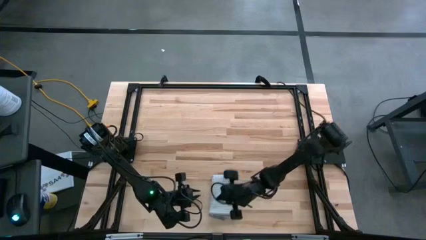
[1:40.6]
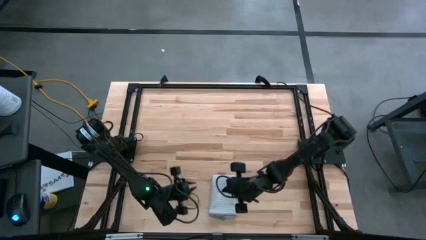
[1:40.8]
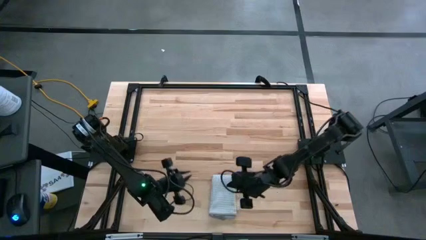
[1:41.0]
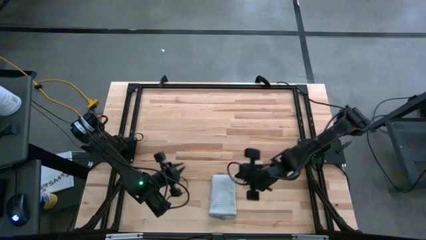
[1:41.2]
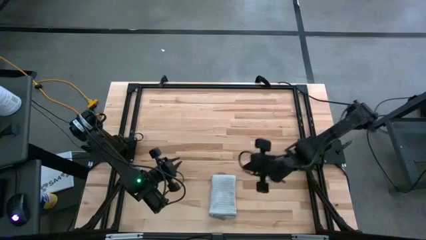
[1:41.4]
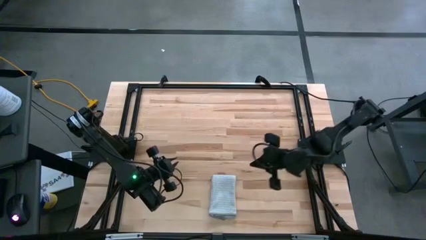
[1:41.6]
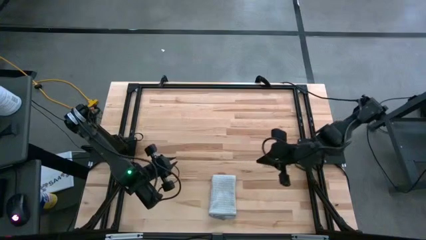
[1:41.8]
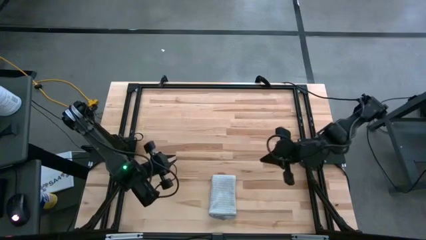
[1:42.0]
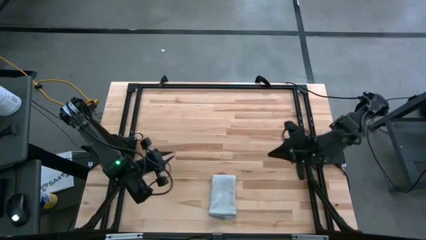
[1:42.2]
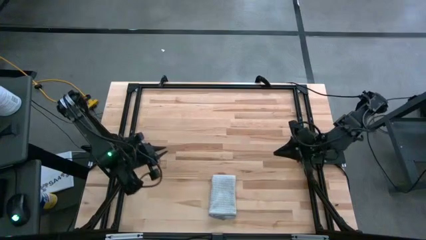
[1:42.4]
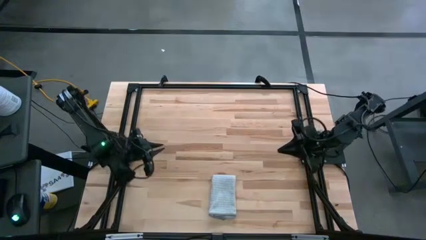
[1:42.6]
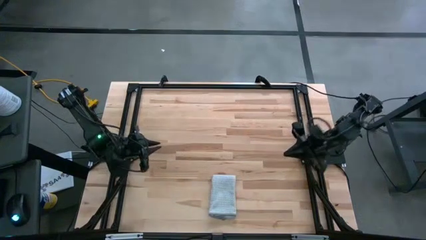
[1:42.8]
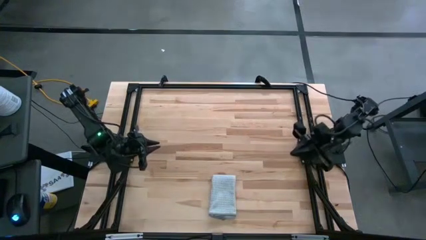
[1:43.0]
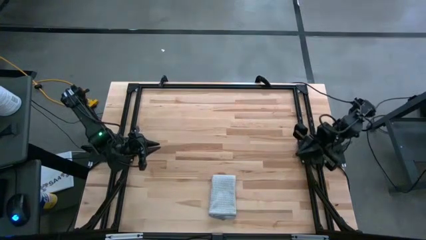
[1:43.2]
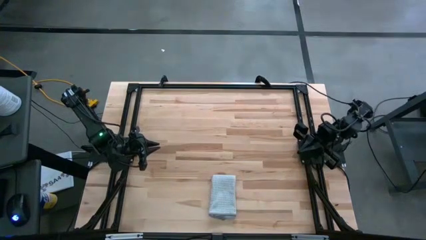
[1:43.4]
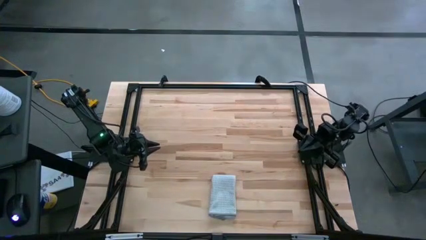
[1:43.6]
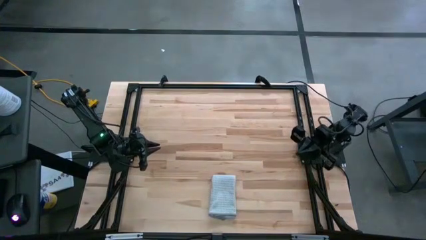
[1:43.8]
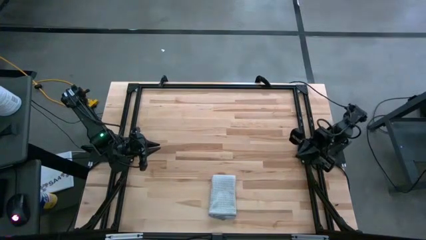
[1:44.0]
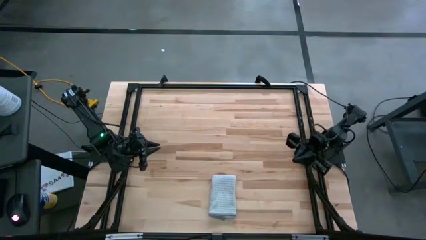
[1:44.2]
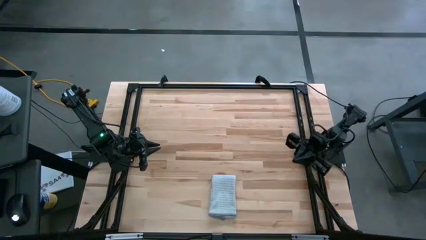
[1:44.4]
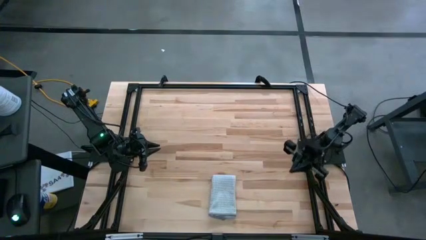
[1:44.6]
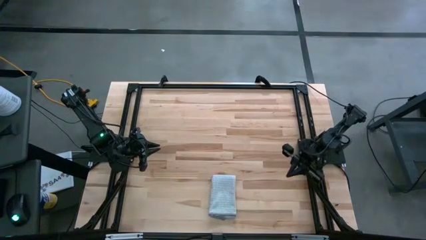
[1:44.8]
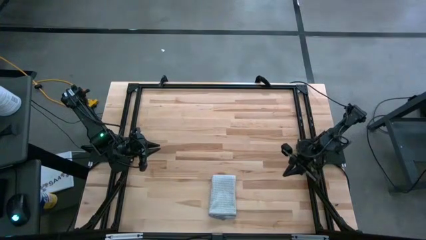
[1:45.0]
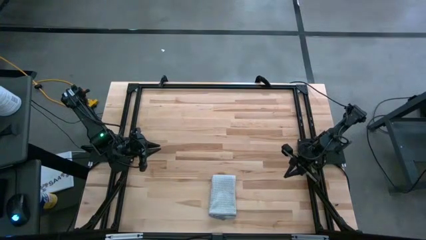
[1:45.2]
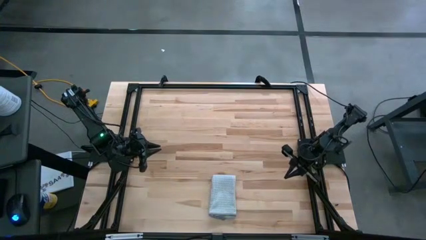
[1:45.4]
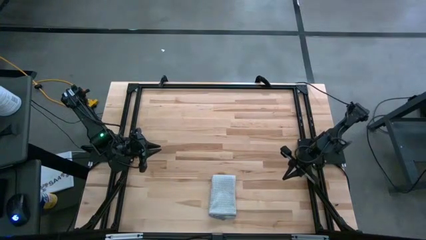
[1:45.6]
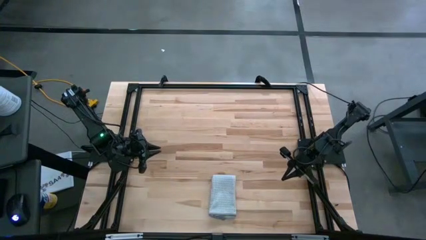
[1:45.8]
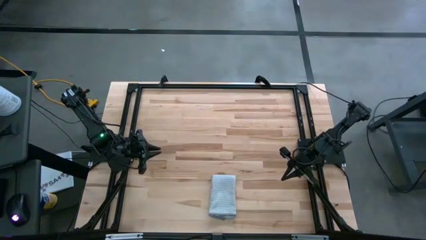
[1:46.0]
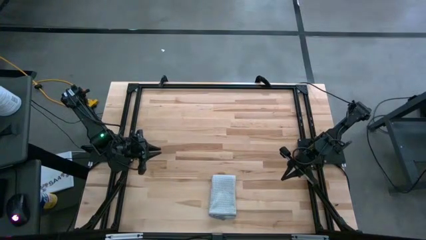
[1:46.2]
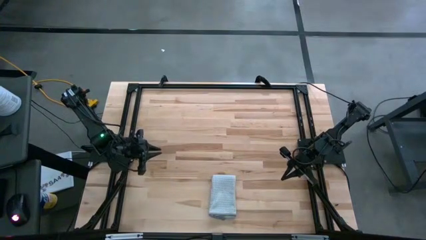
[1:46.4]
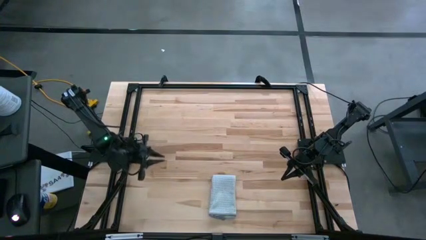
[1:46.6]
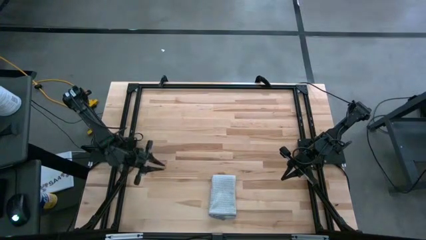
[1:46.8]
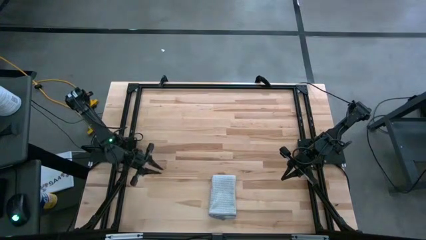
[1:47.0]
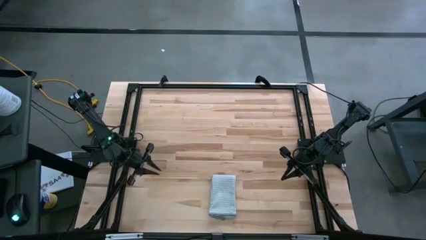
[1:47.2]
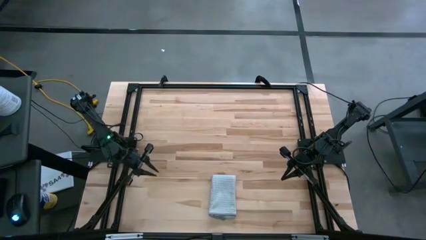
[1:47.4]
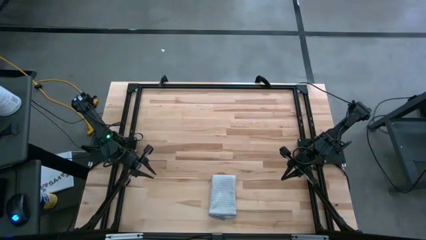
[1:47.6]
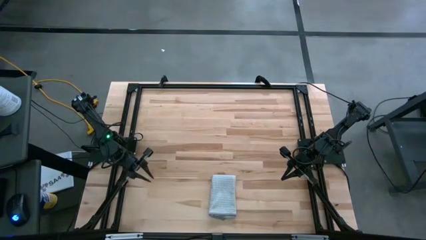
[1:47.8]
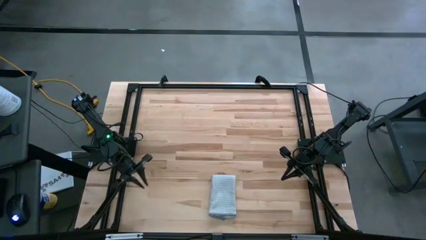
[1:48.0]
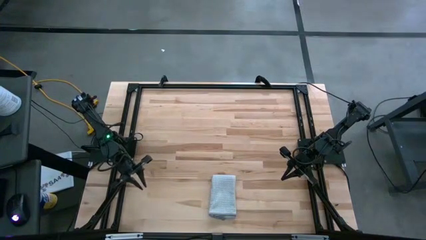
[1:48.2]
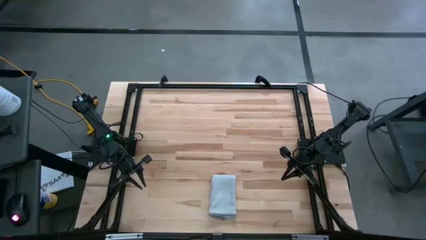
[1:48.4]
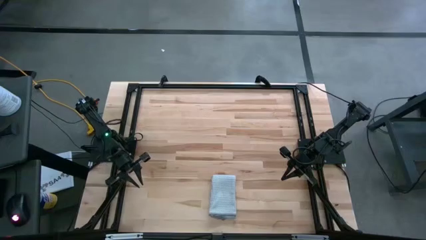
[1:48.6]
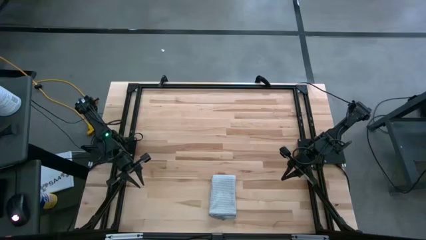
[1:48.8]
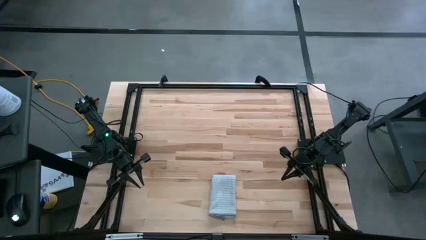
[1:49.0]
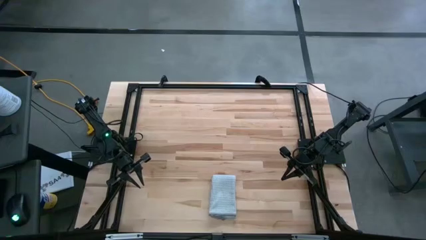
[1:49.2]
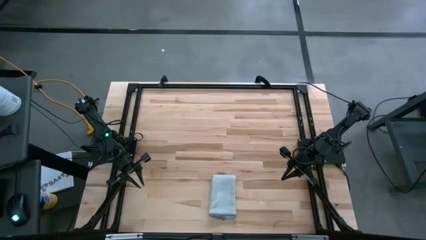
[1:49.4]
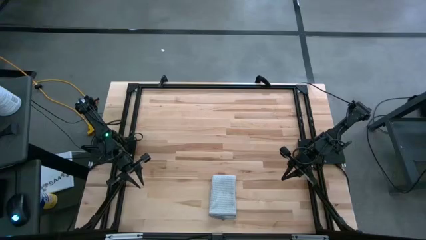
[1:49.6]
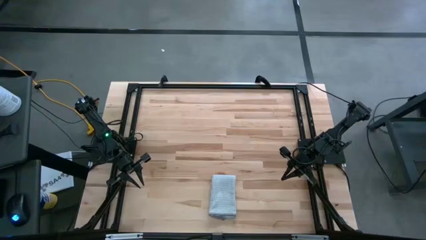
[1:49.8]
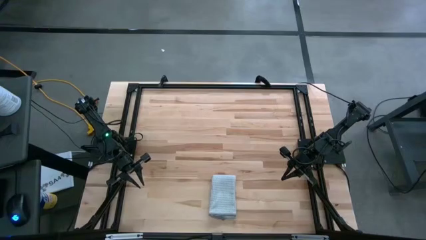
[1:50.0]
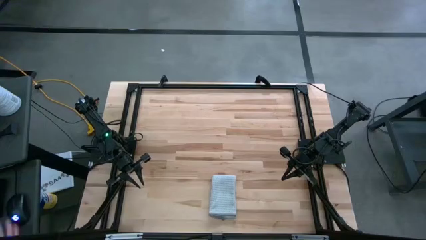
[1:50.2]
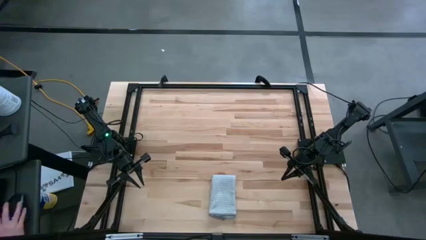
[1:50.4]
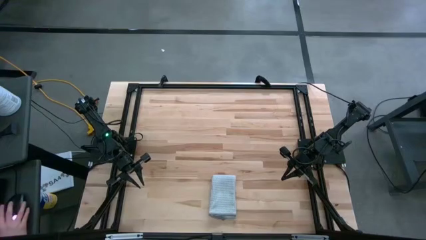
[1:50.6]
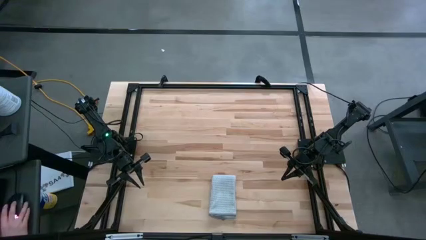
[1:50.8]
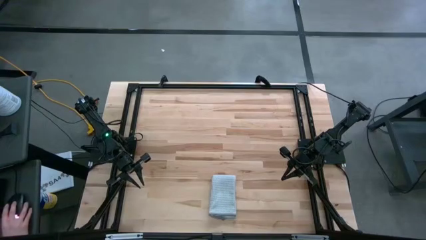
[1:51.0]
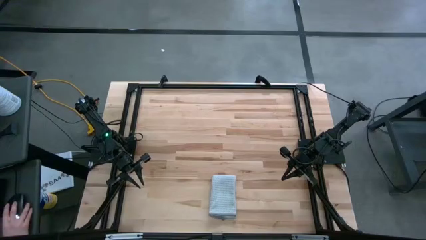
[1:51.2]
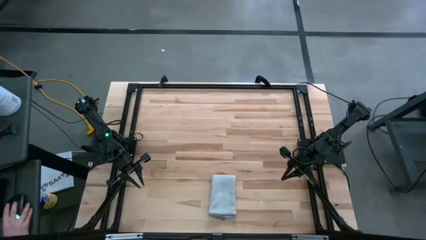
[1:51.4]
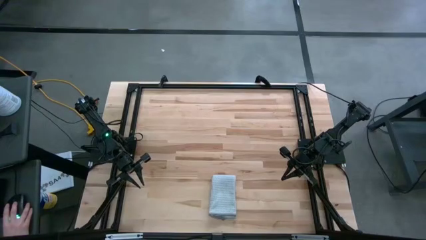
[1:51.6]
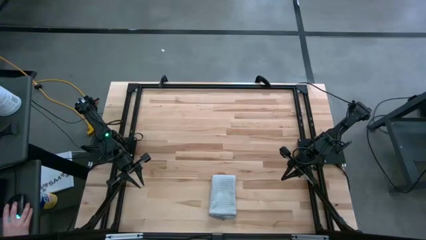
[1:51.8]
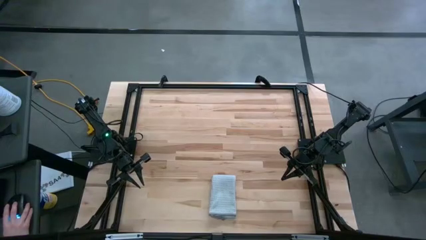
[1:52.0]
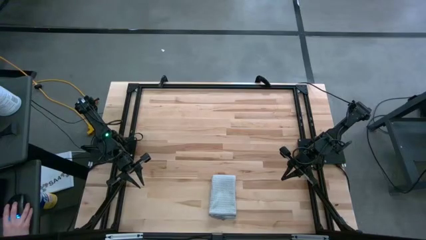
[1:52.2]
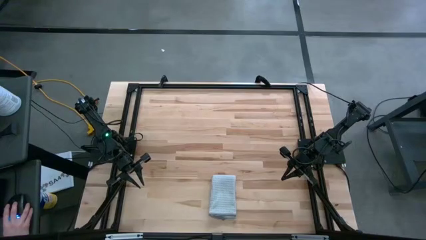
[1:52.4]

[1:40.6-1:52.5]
Task: Fold microfiber towels
Return To Home Position
